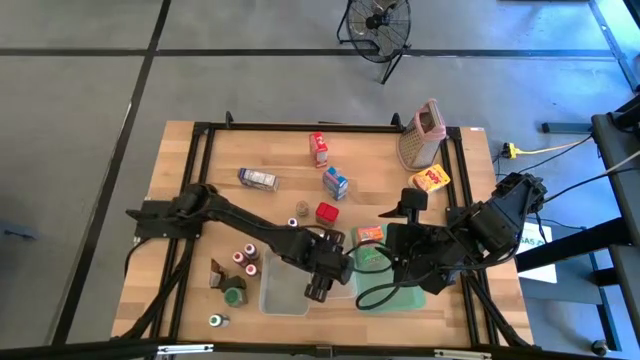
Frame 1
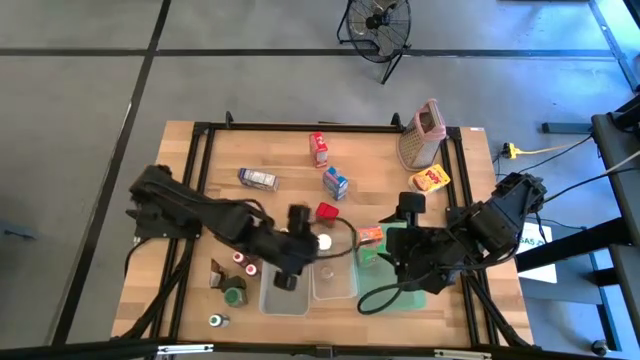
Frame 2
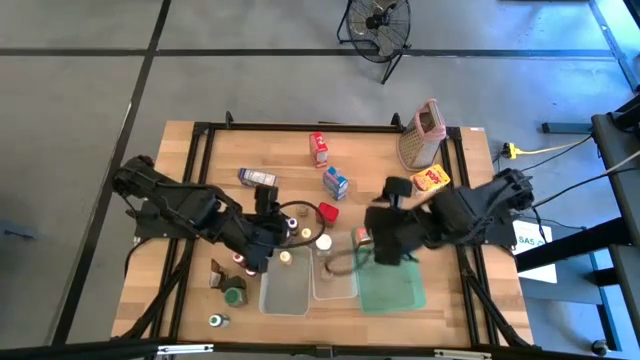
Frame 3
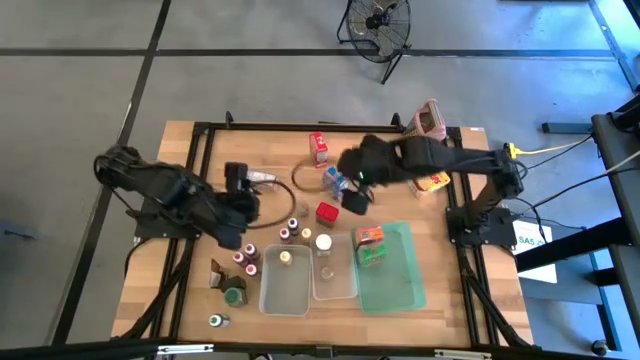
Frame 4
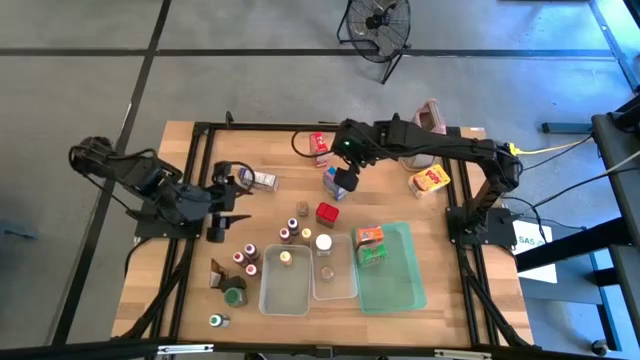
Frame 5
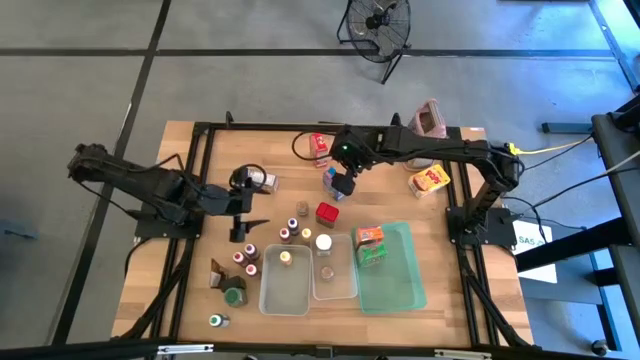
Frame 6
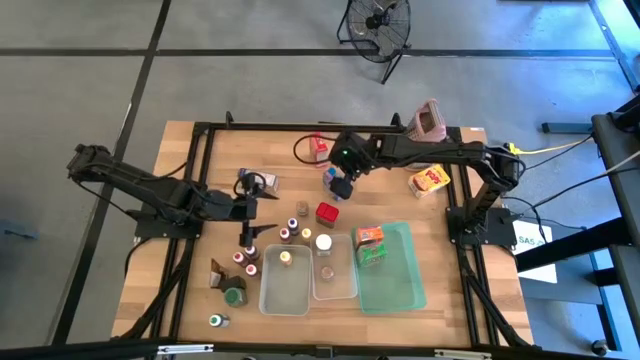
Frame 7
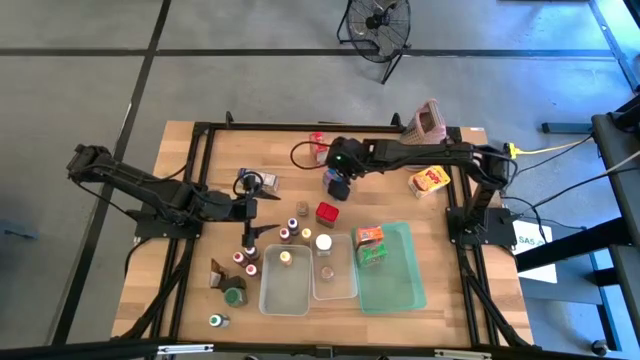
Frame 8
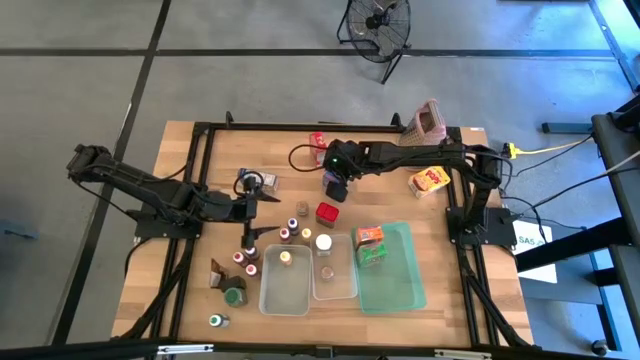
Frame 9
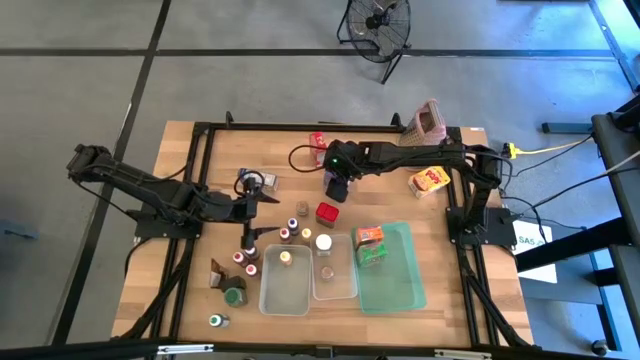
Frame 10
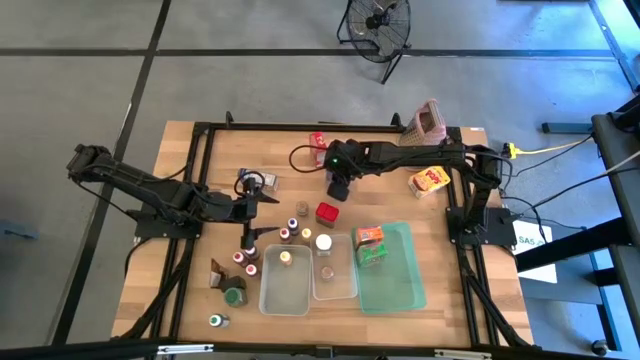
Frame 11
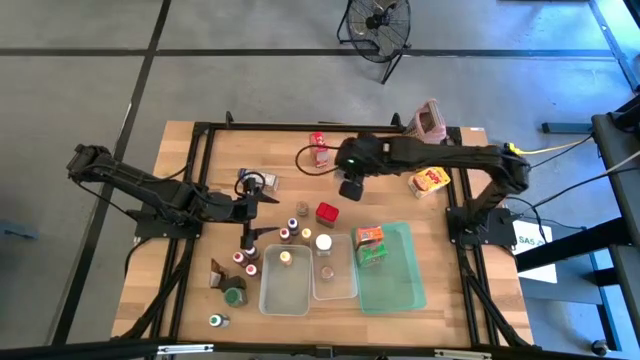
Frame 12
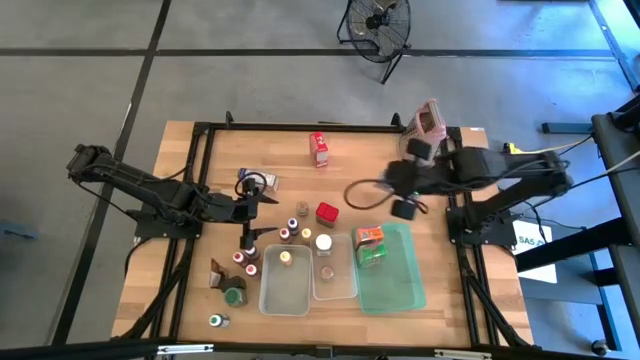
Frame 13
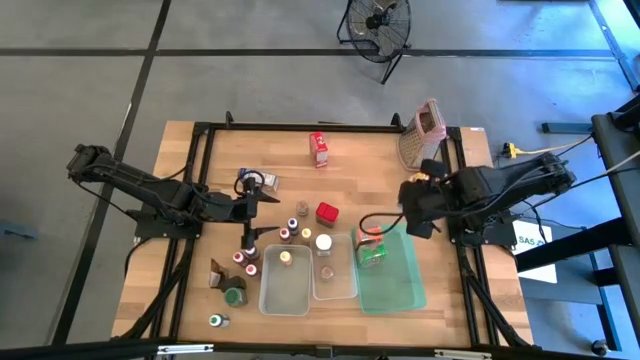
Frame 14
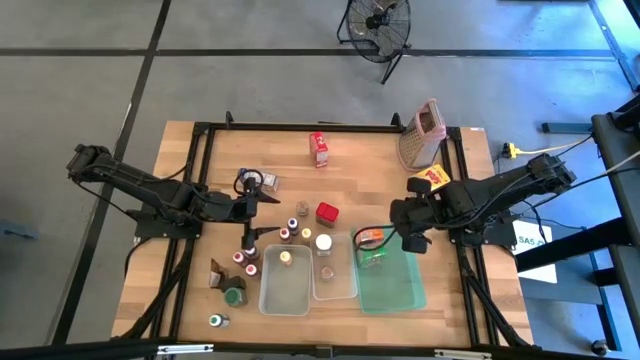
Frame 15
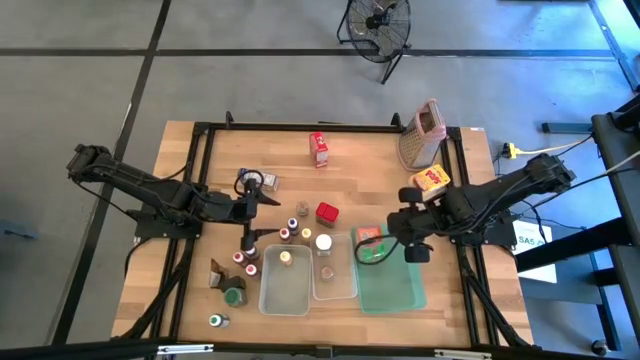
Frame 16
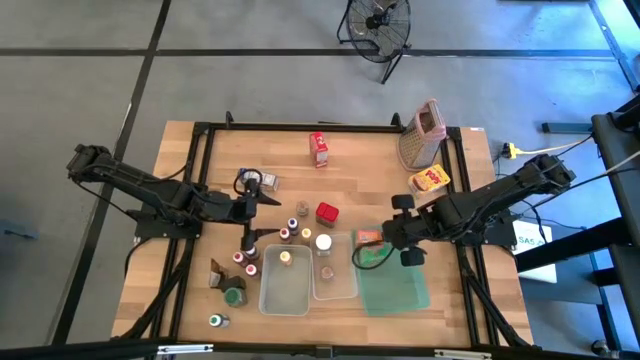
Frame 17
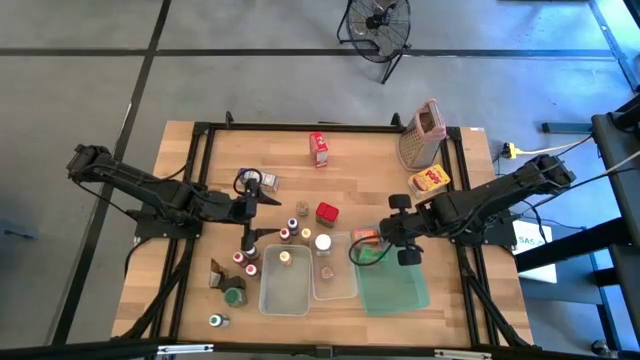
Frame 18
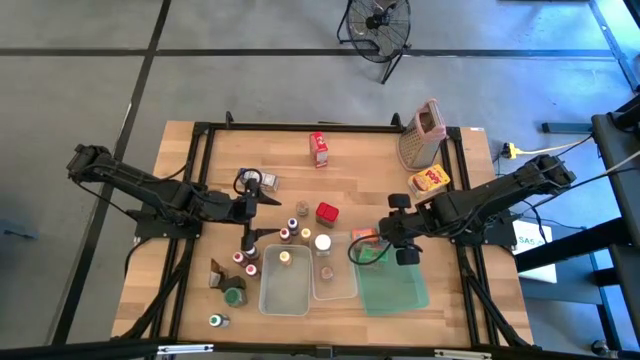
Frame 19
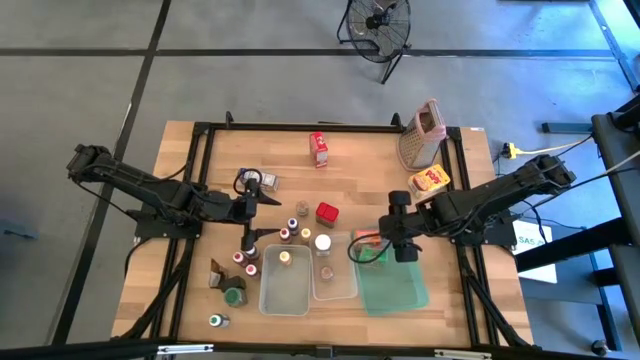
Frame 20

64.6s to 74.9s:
Task: Pick & Place Kitchen Items
Put the blue cereal box into the blue bin

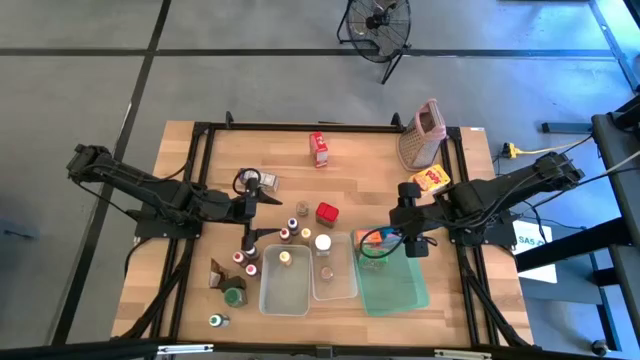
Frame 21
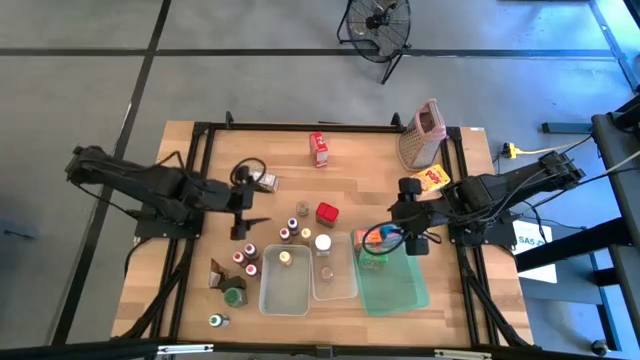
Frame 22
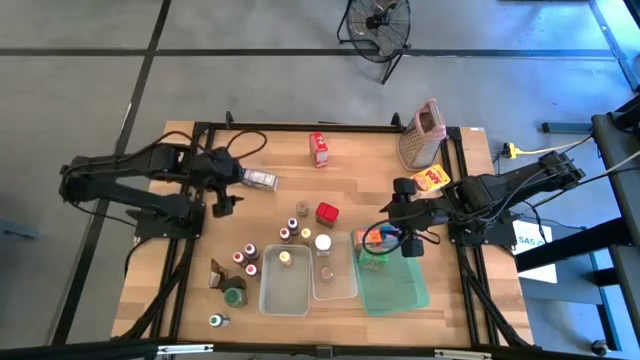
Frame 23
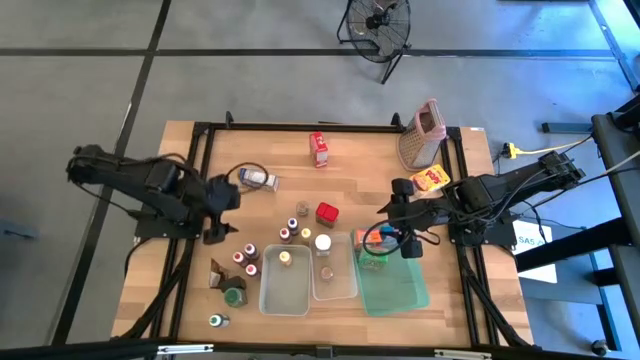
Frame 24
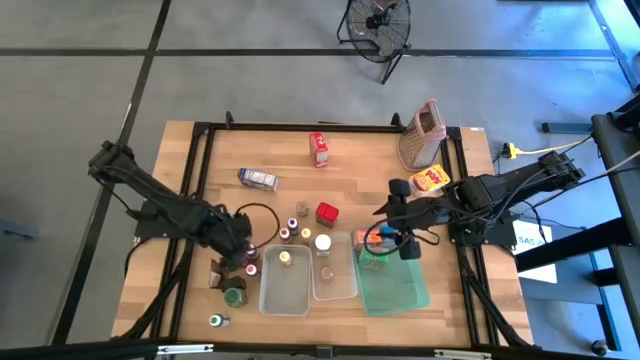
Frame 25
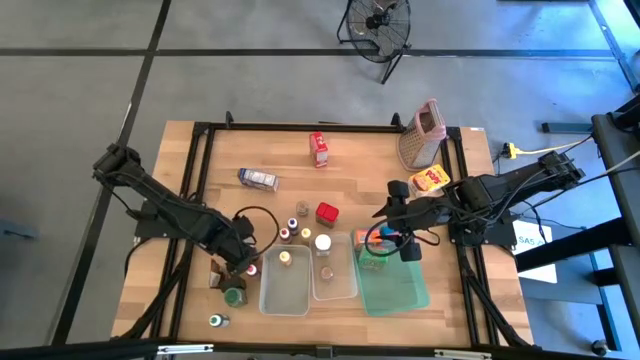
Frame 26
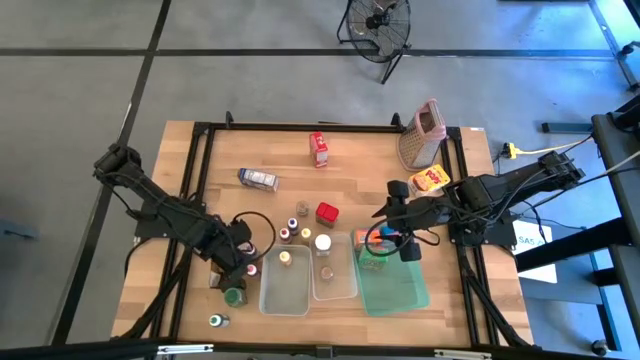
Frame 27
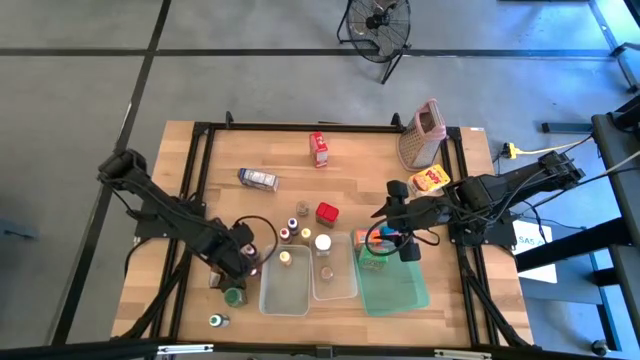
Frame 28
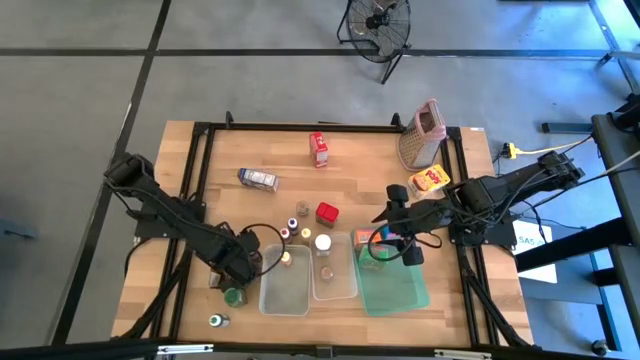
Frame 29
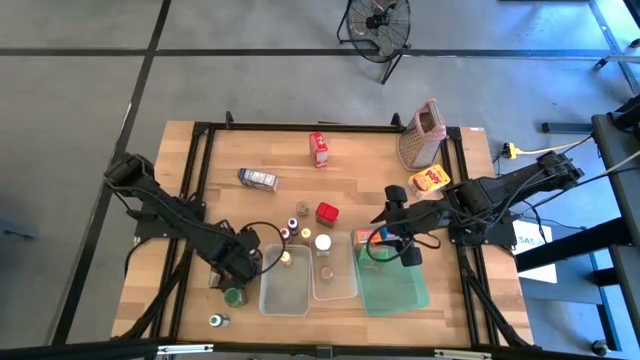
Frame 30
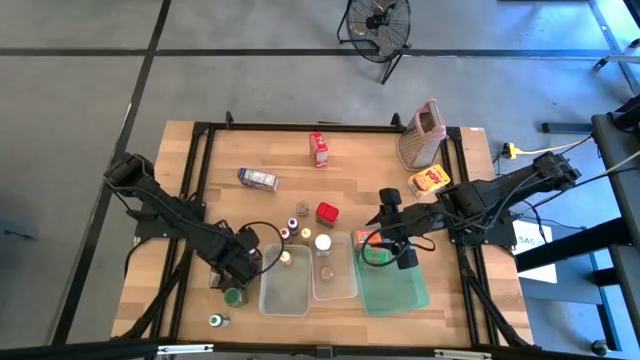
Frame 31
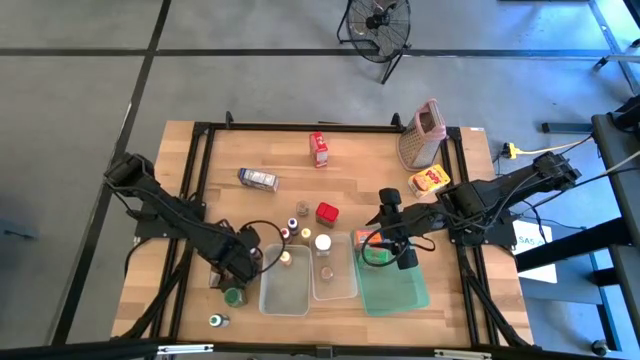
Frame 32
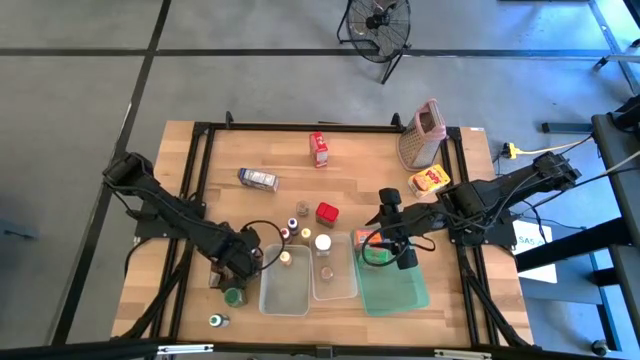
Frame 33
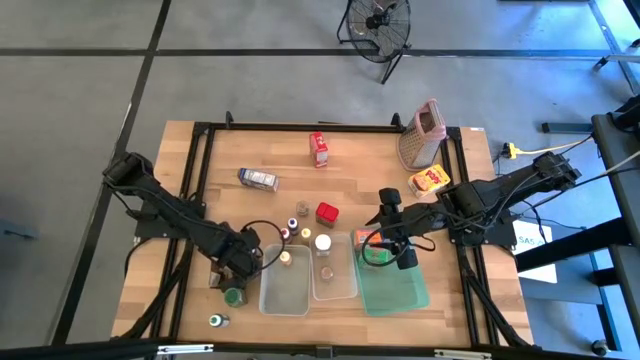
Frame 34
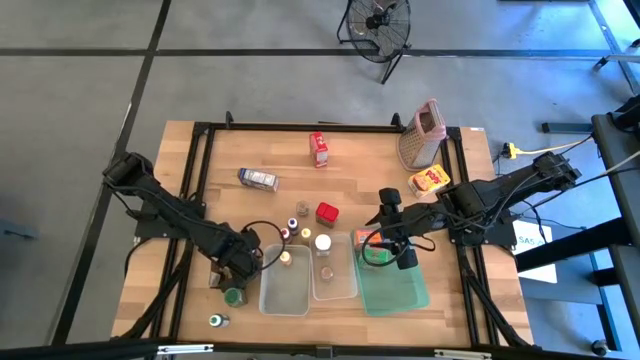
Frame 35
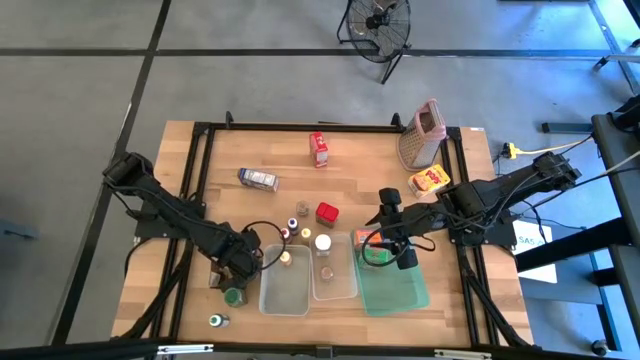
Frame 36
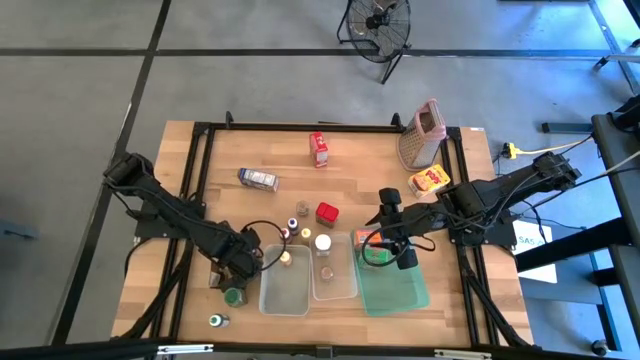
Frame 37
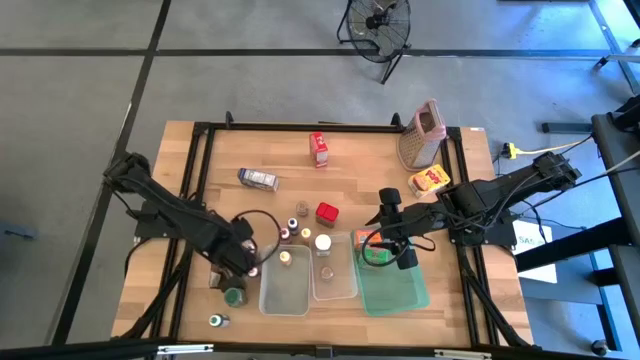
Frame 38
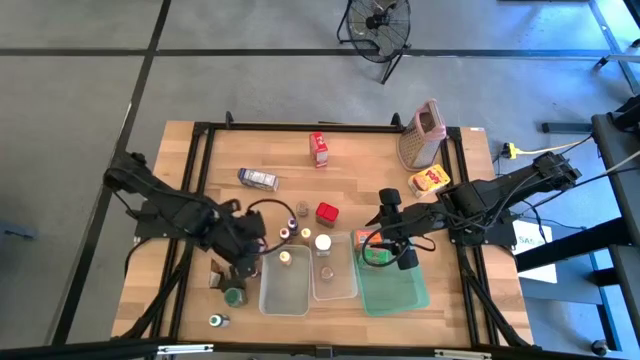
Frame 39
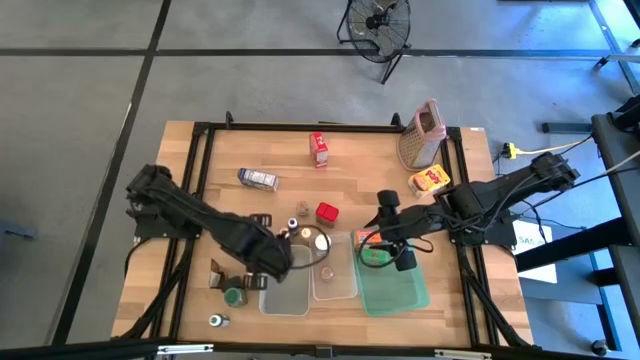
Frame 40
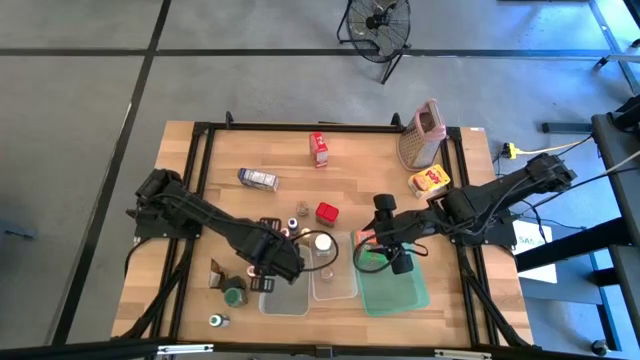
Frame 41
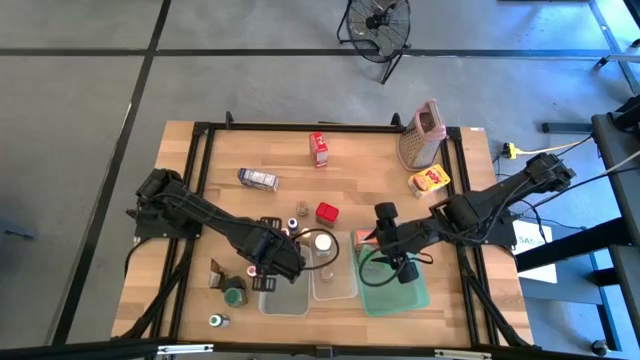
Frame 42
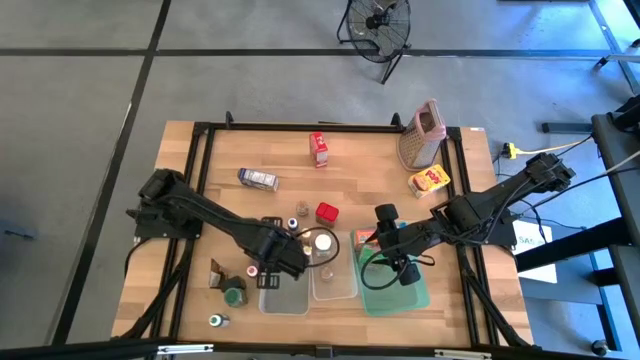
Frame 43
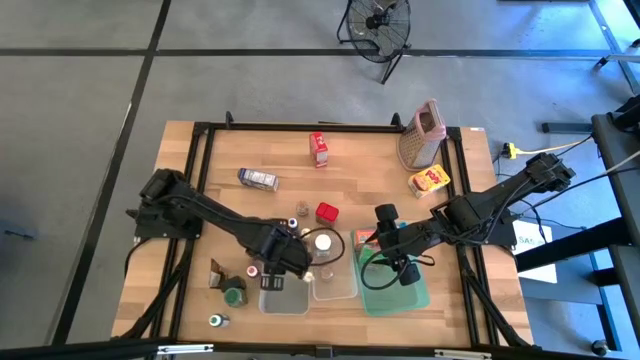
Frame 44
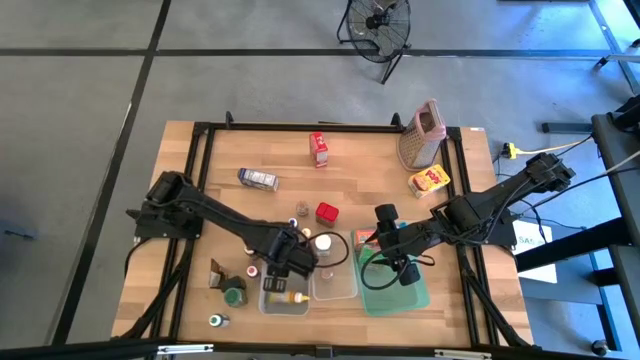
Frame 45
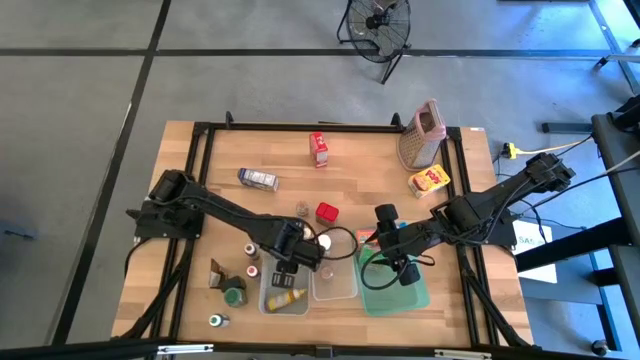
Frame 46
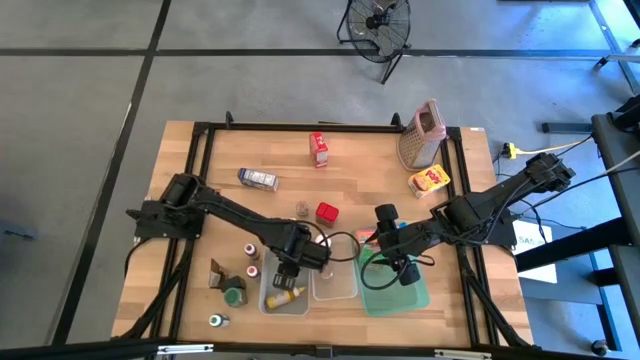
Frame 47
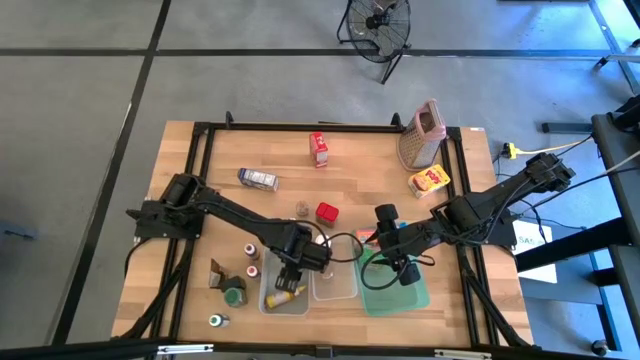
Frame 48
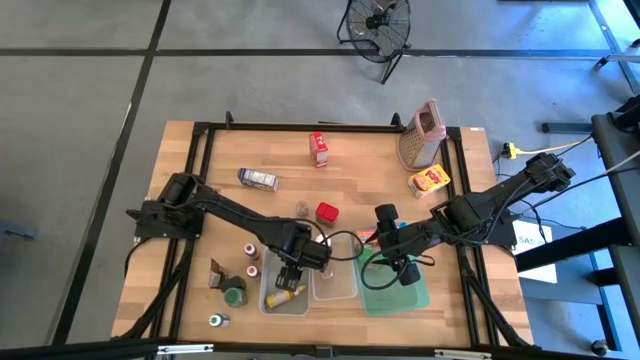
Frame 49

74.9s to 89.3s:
Put the red food coloring bottle into the gray bin
